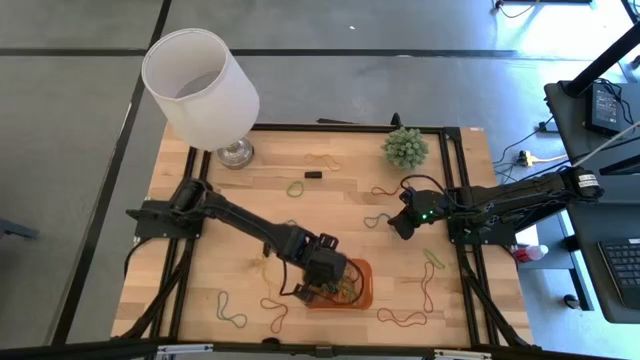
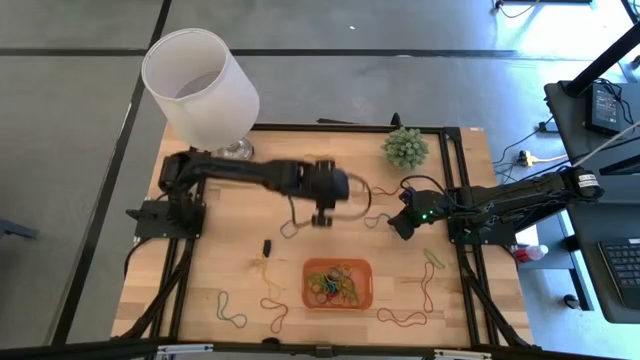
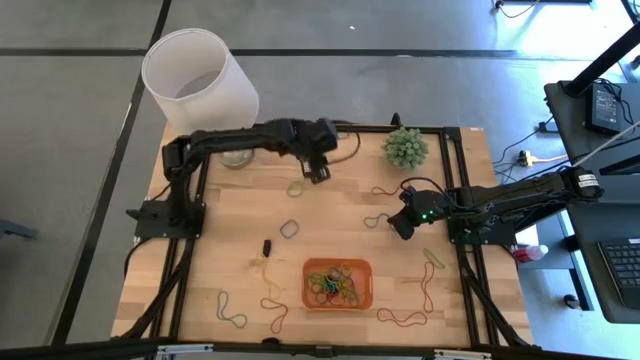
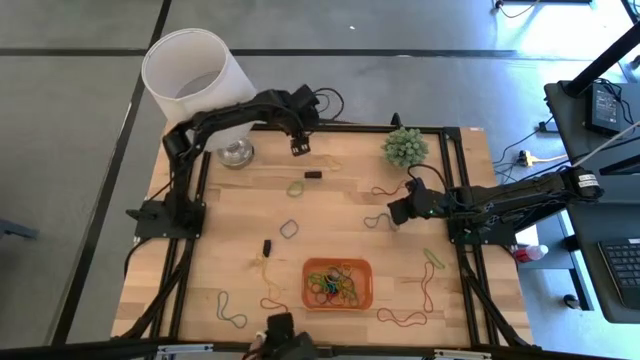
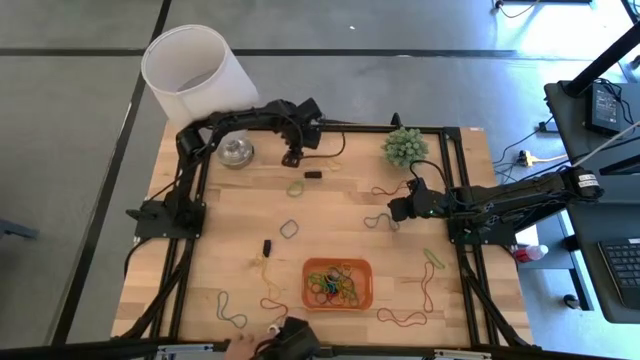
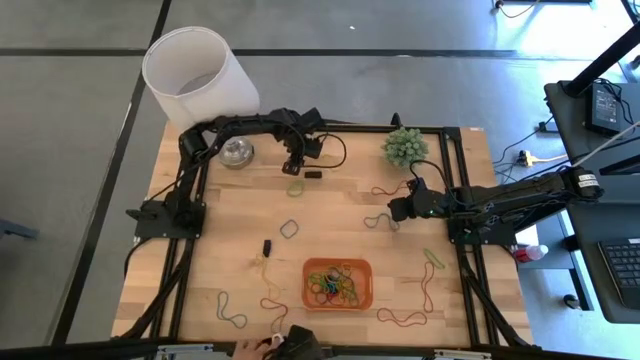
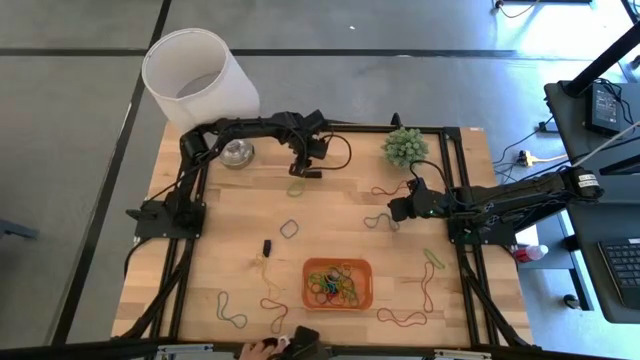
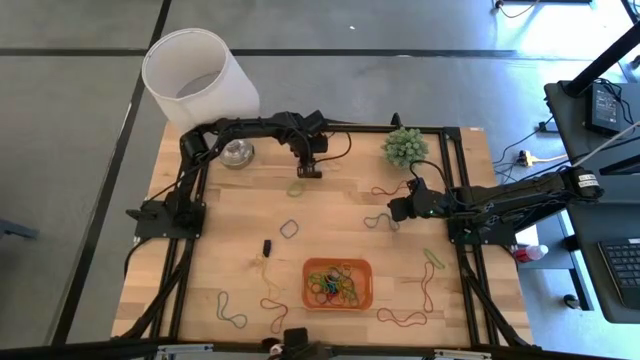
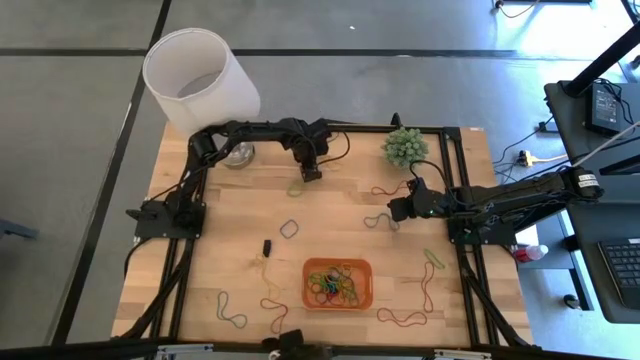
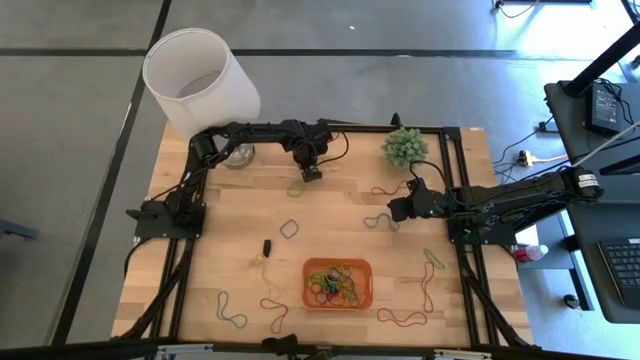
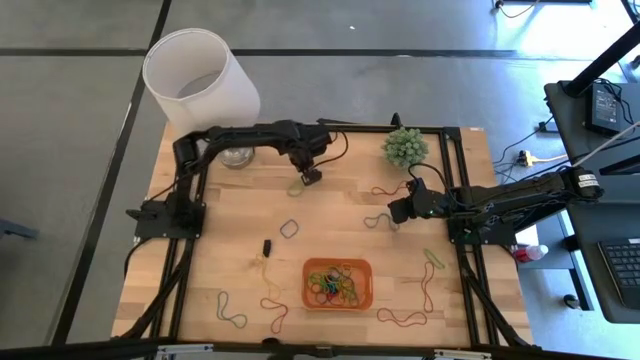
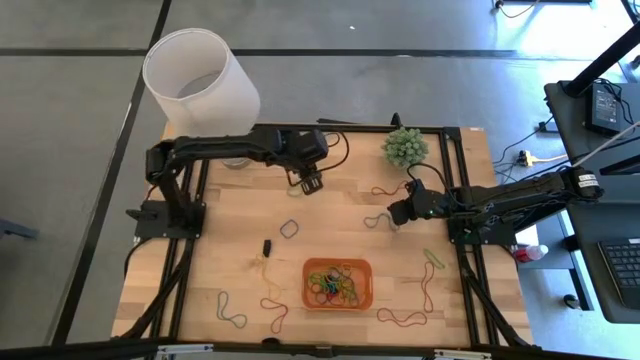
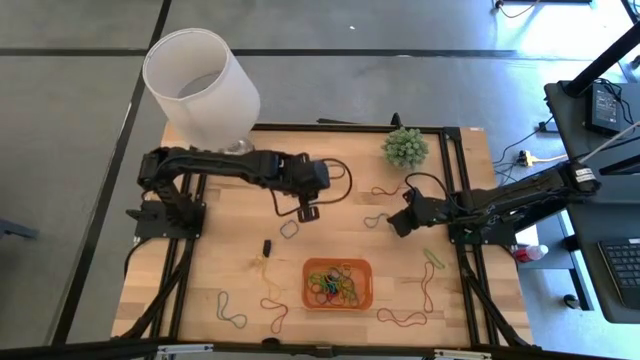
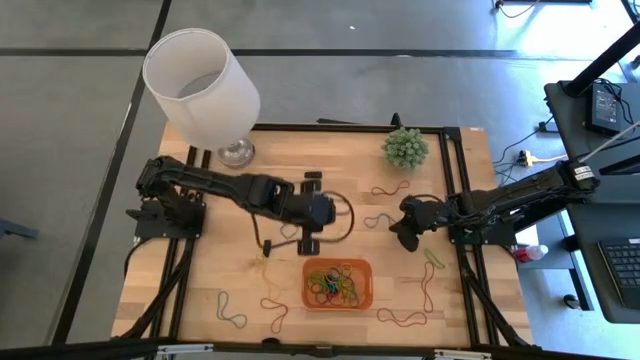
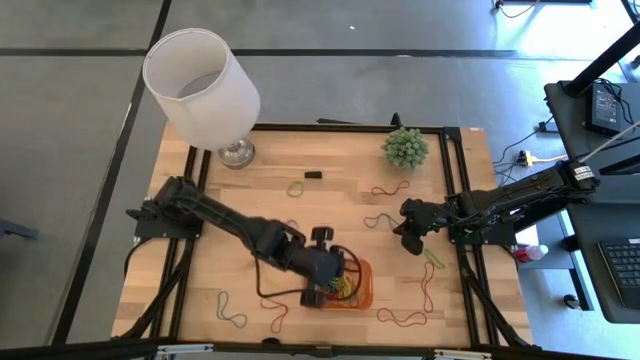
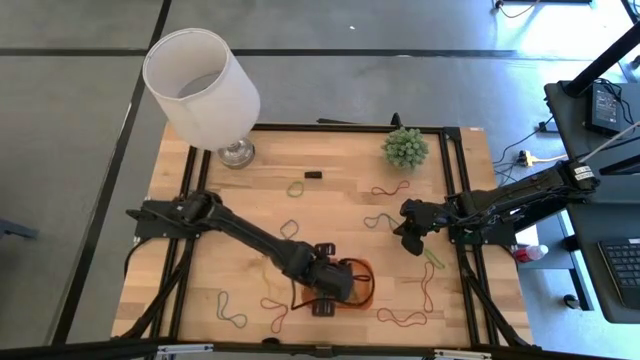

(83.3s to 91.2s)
Task: Pick and place rubber bands into bin
Put the yellow rubber band into the orange bin

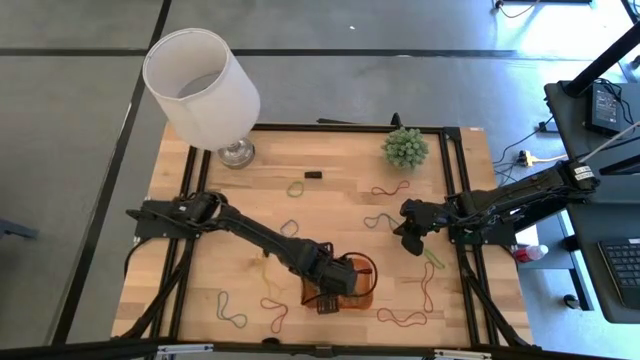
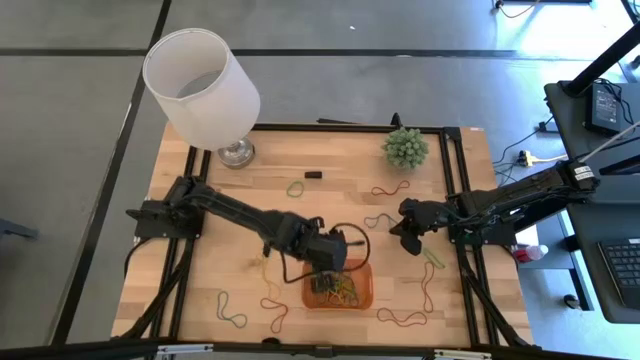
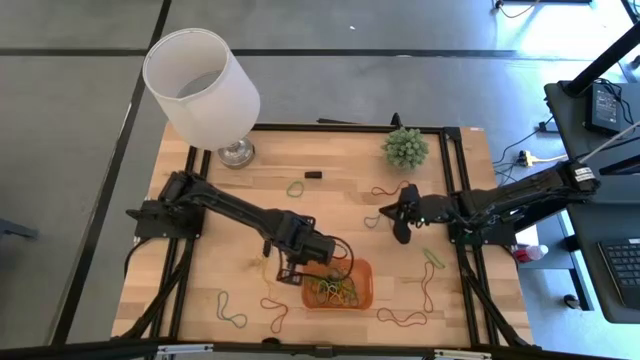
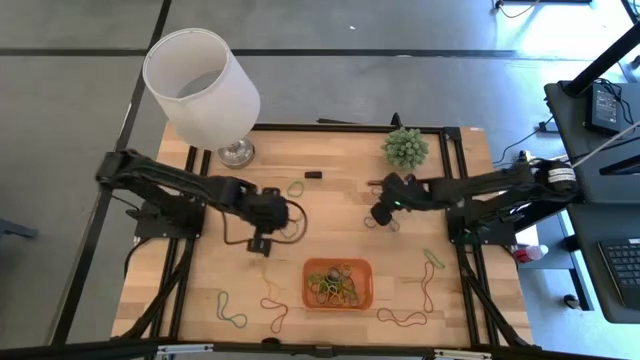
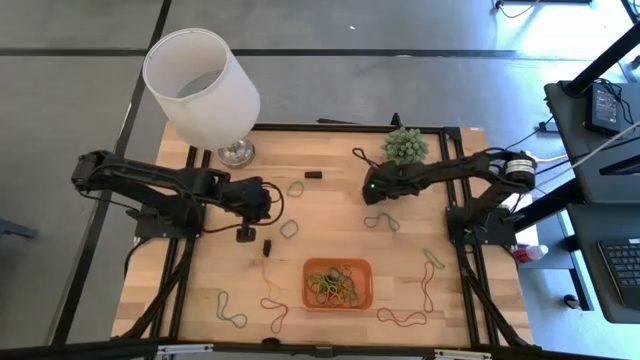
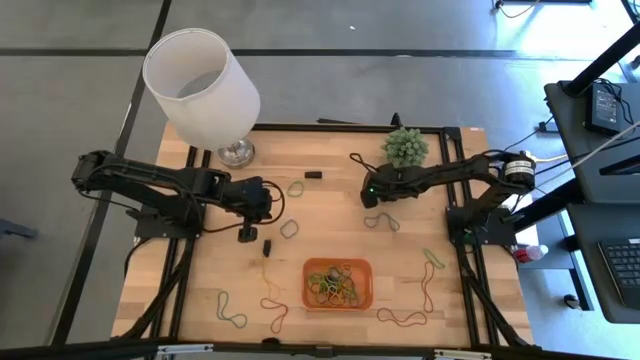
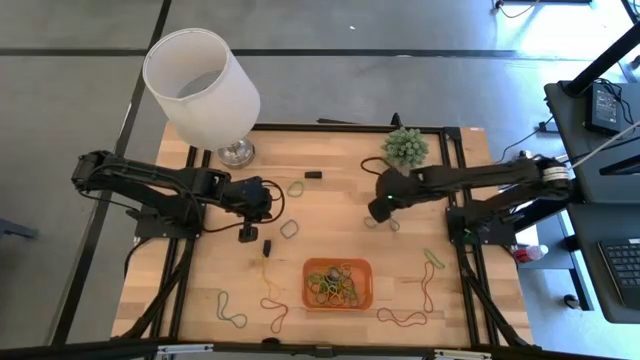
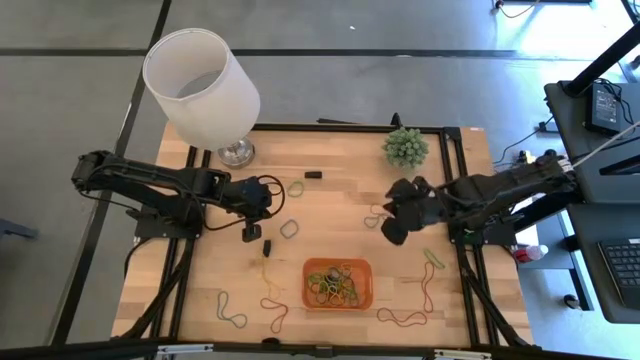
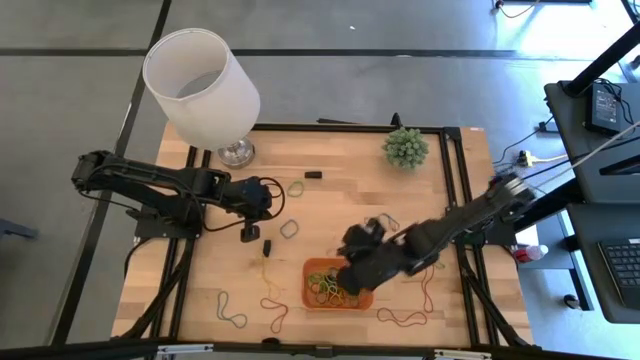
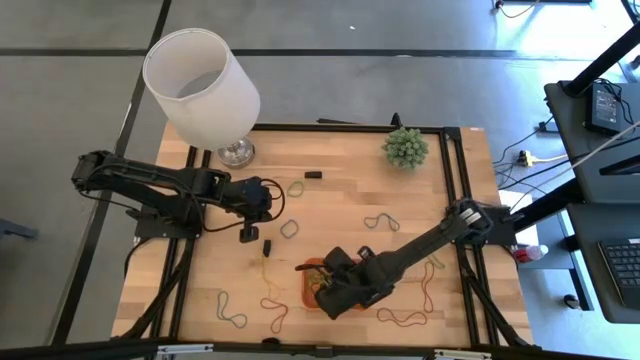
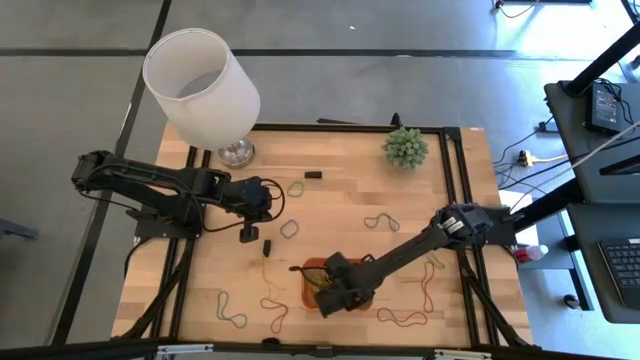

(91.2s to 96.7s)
Put the red rubber band into the orange bin

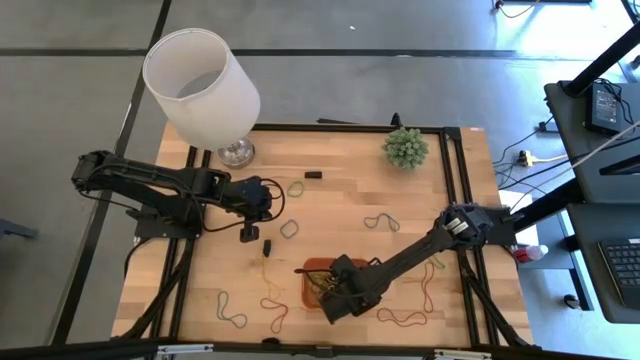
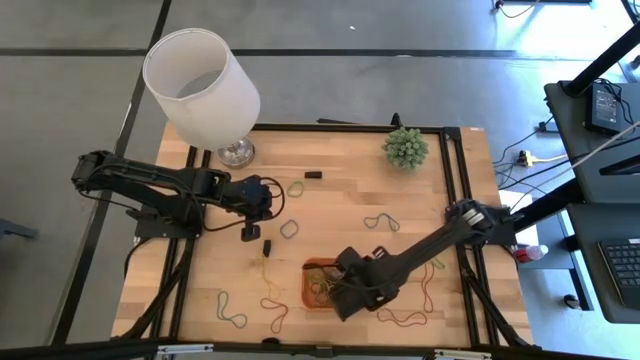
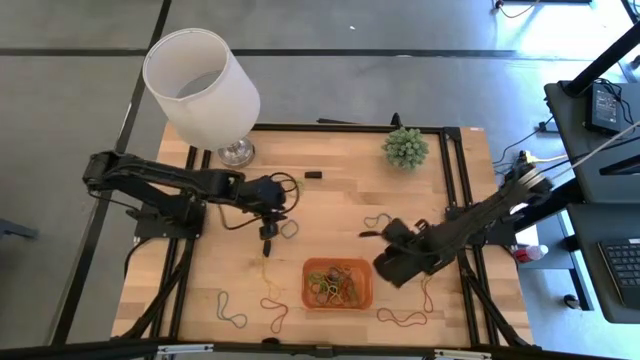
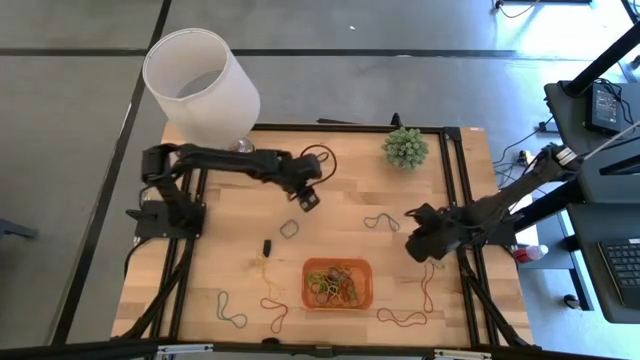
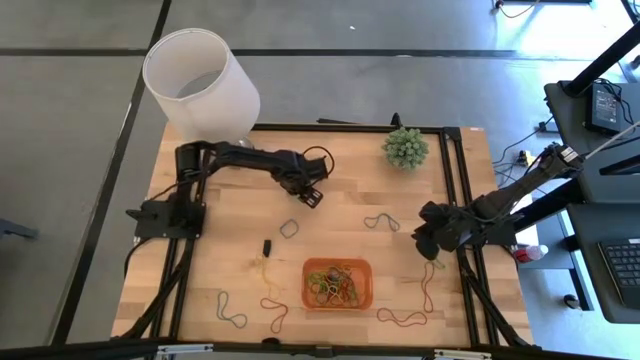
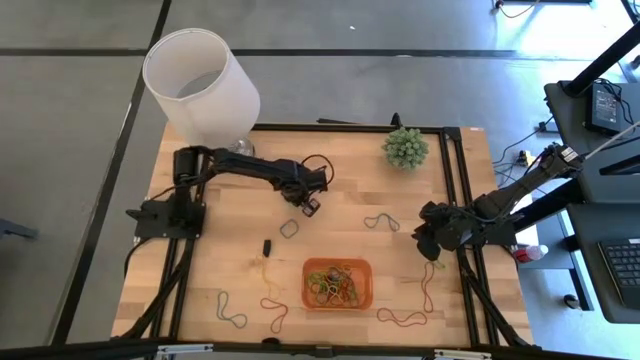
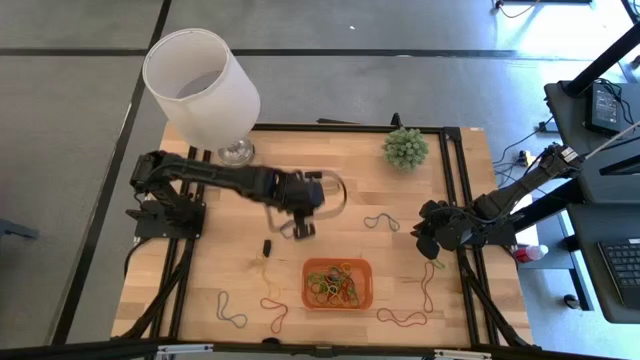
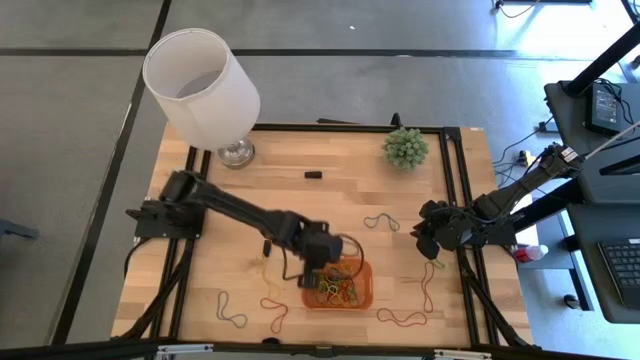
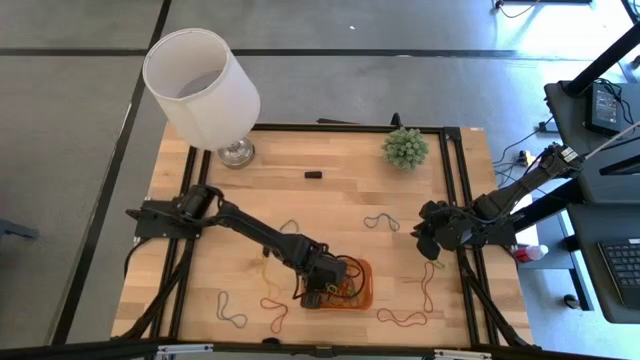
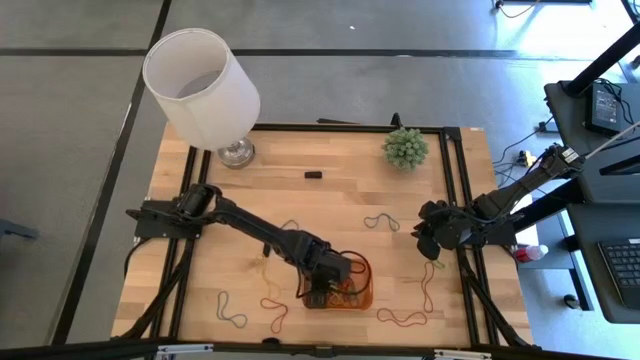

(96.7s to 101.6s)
Put the green rubber band into the orange bin

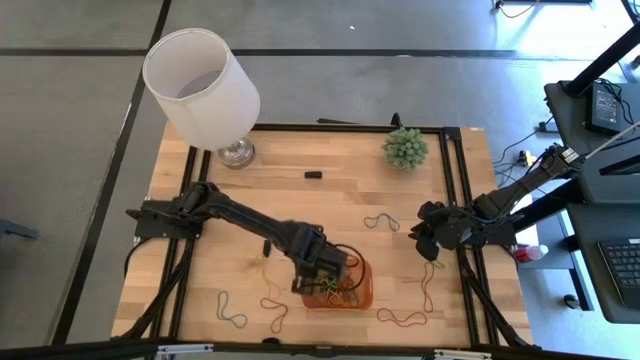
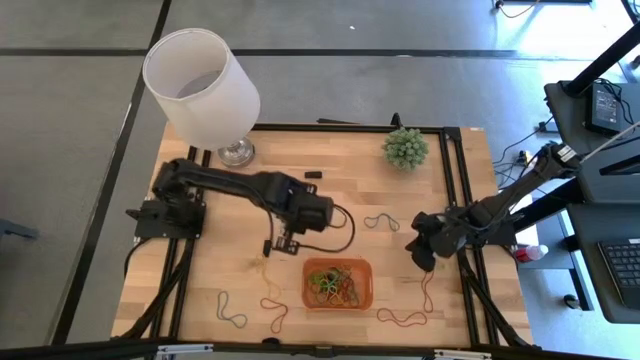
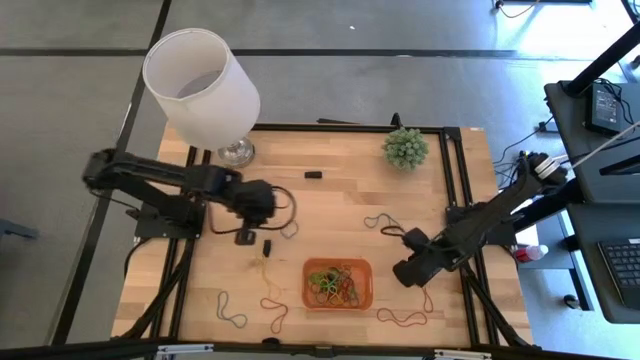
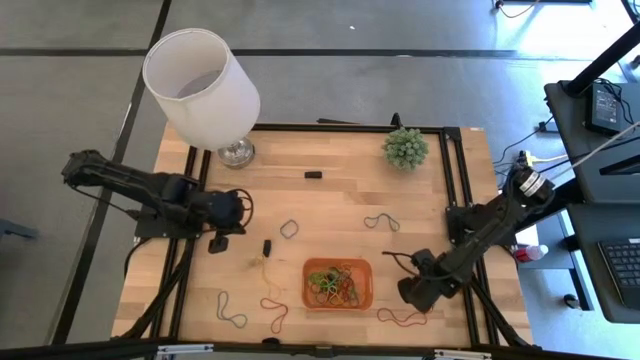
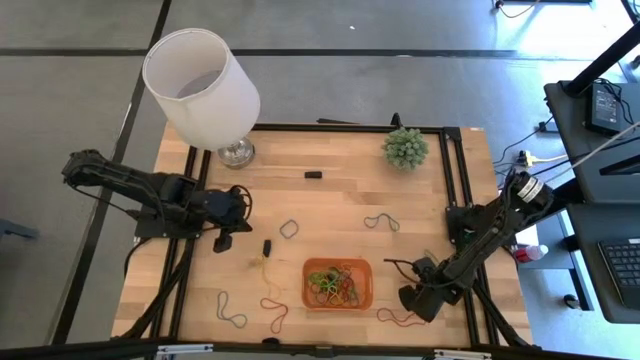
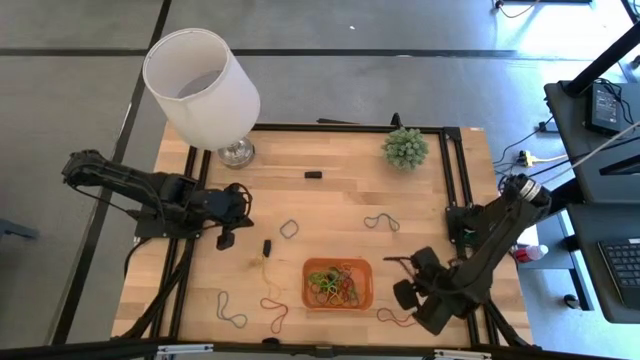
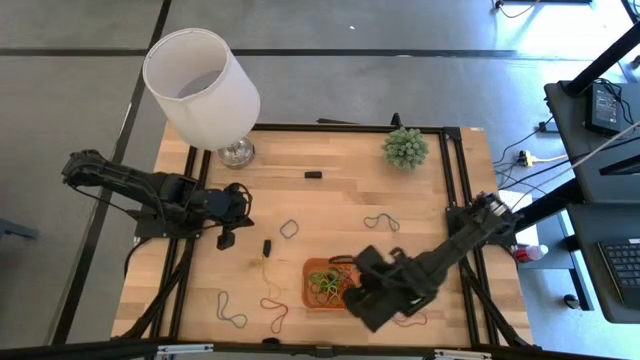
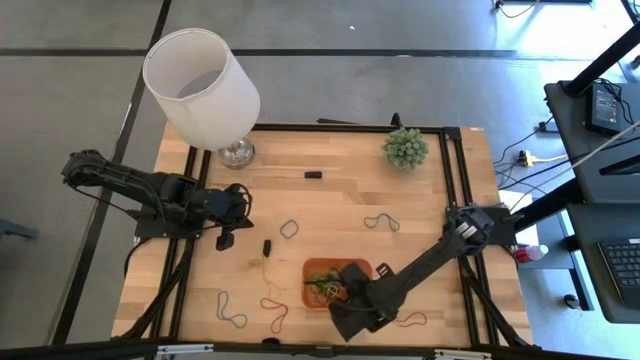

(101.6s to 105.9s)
Put the red rubber band into the orange bin
